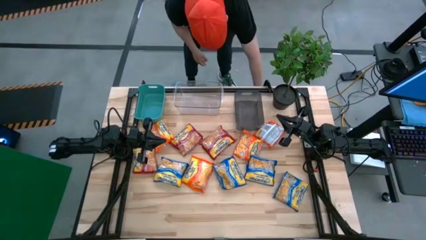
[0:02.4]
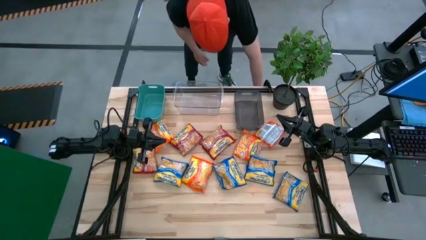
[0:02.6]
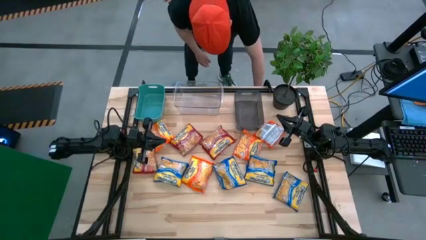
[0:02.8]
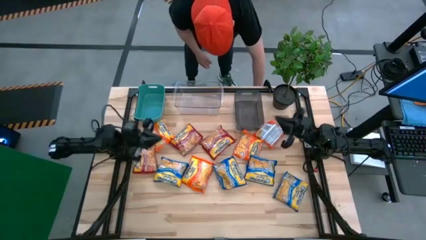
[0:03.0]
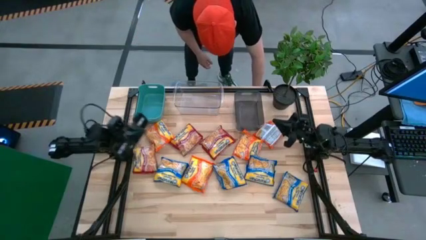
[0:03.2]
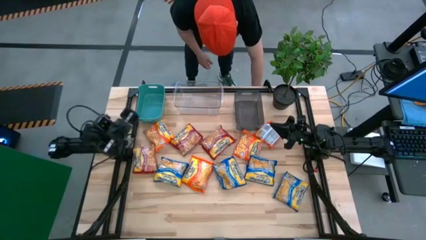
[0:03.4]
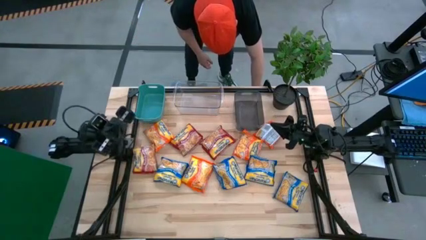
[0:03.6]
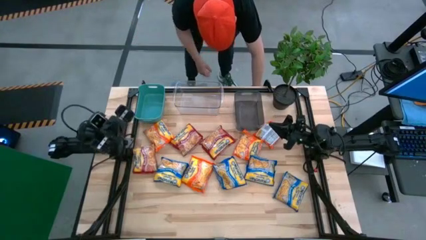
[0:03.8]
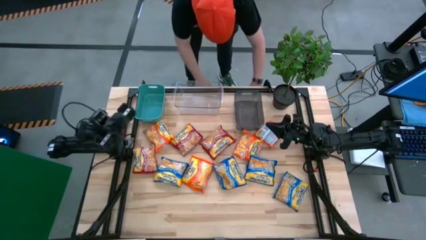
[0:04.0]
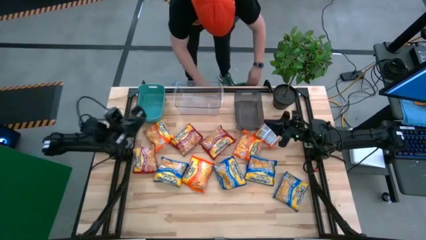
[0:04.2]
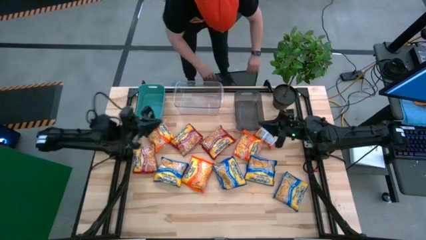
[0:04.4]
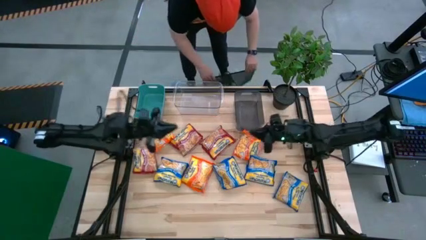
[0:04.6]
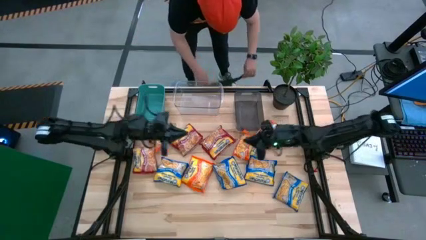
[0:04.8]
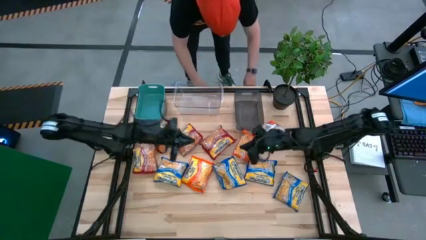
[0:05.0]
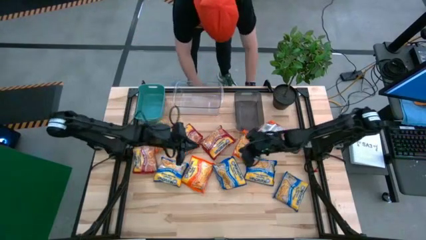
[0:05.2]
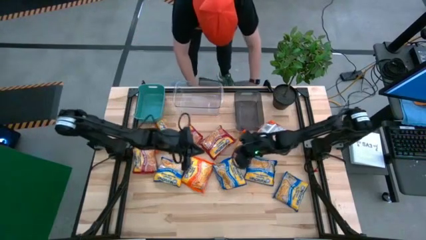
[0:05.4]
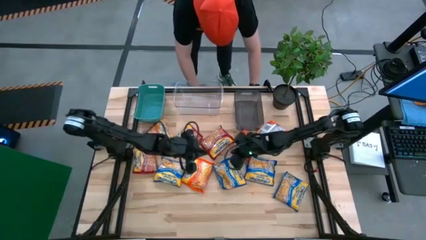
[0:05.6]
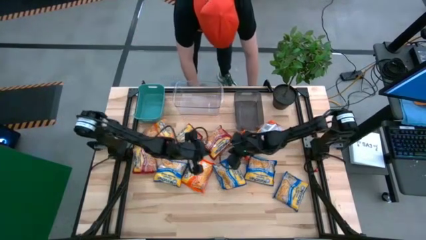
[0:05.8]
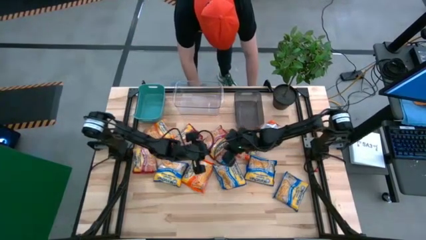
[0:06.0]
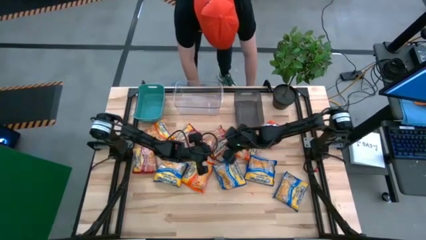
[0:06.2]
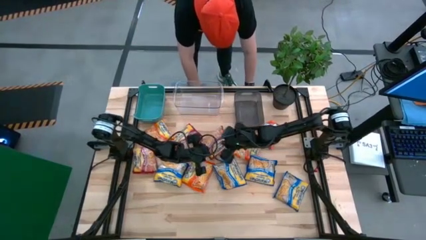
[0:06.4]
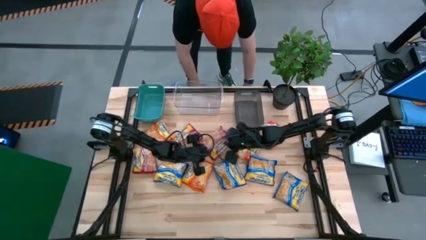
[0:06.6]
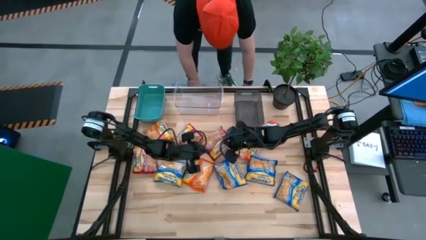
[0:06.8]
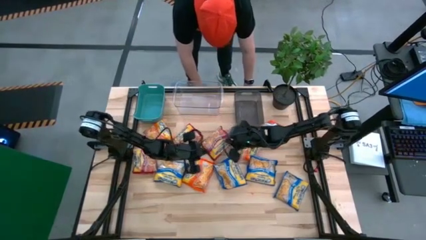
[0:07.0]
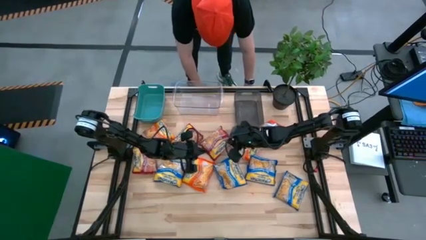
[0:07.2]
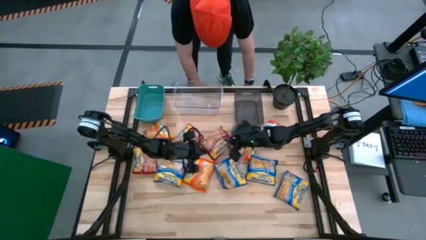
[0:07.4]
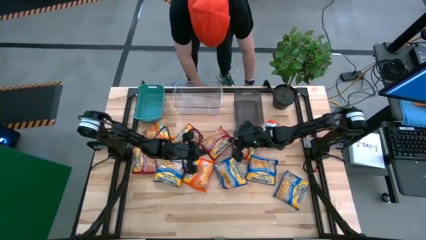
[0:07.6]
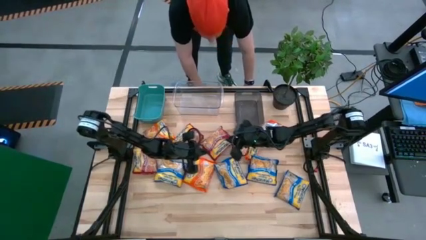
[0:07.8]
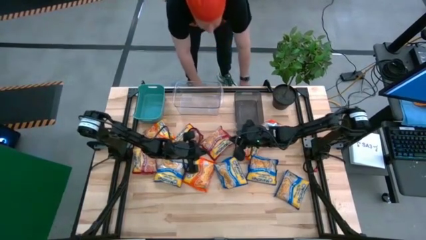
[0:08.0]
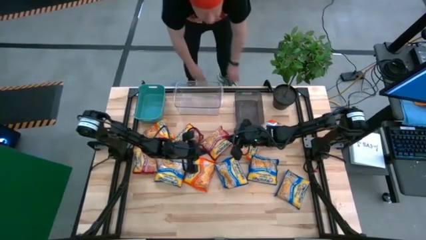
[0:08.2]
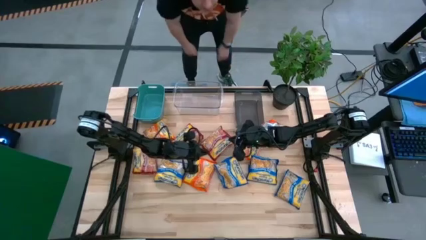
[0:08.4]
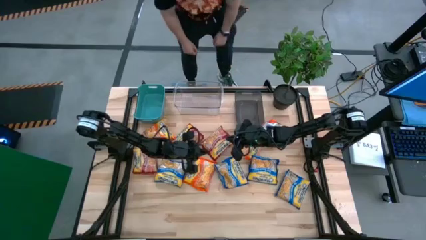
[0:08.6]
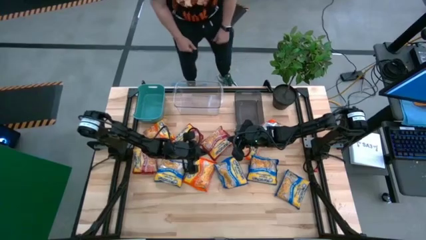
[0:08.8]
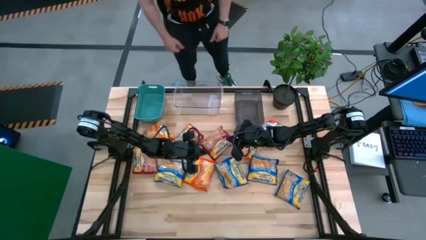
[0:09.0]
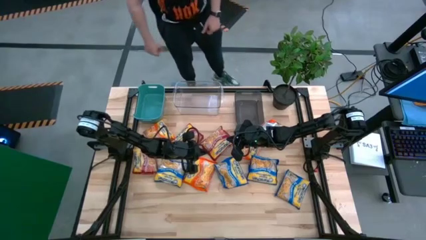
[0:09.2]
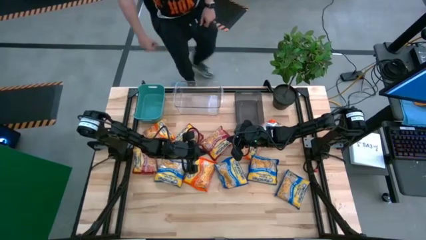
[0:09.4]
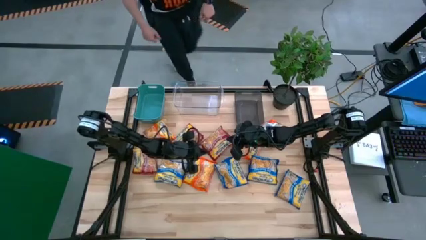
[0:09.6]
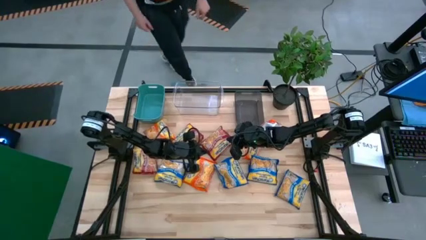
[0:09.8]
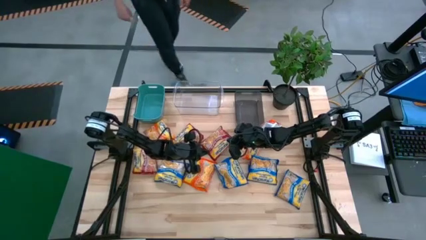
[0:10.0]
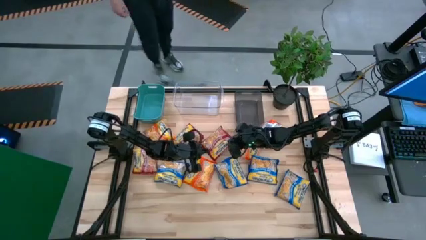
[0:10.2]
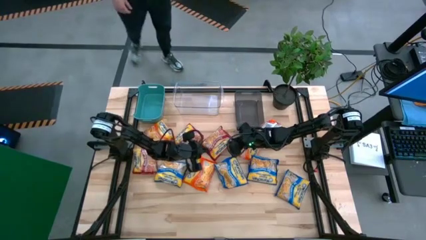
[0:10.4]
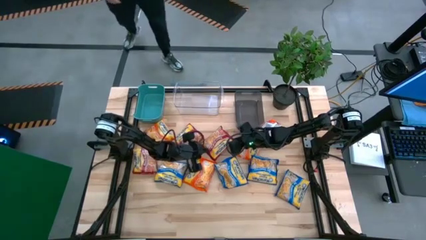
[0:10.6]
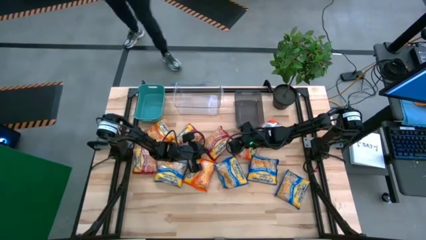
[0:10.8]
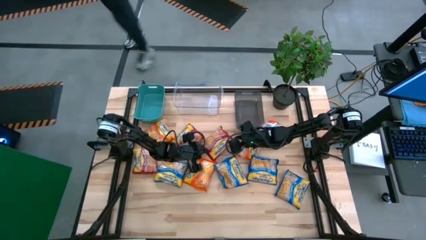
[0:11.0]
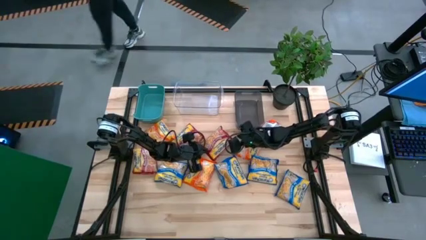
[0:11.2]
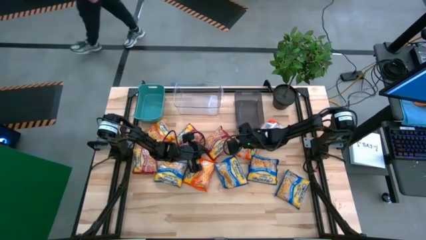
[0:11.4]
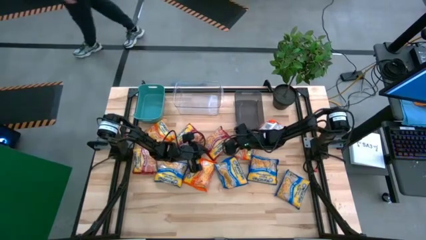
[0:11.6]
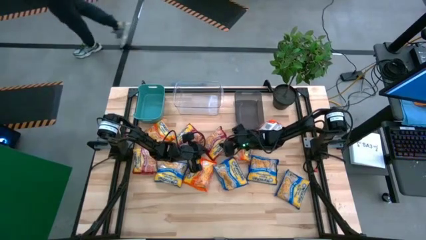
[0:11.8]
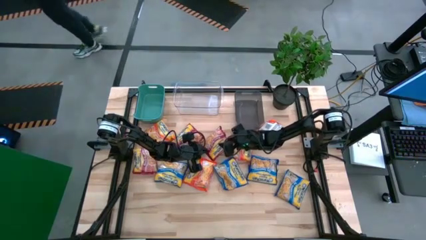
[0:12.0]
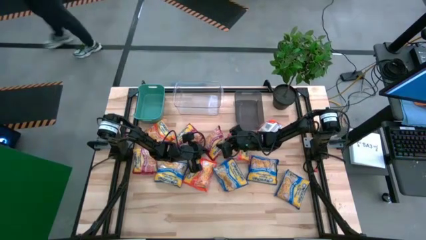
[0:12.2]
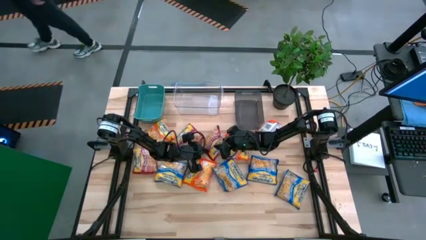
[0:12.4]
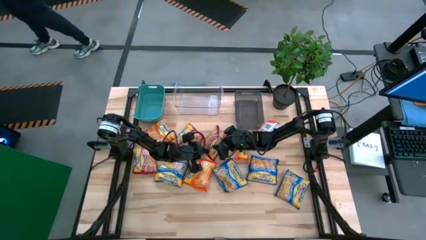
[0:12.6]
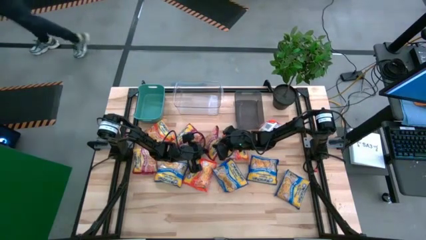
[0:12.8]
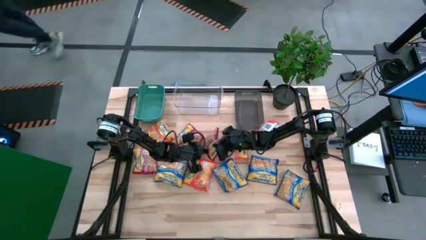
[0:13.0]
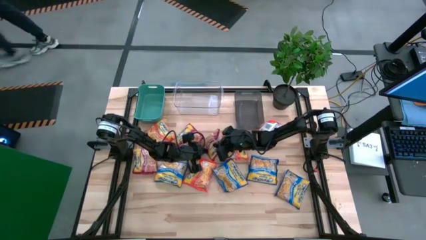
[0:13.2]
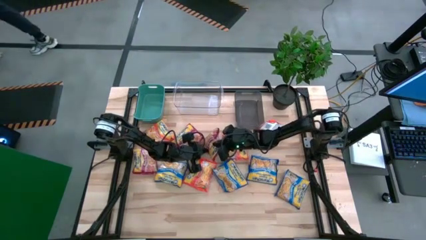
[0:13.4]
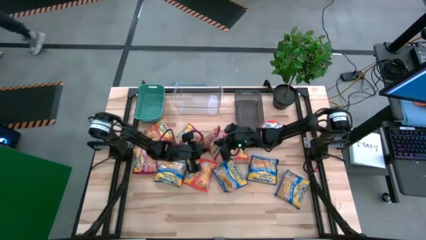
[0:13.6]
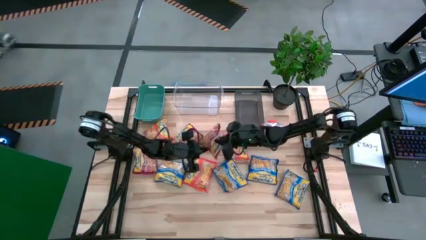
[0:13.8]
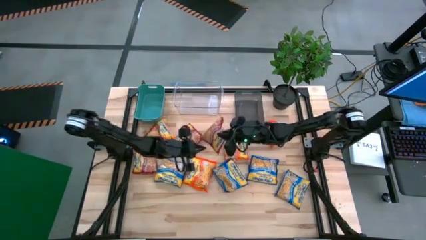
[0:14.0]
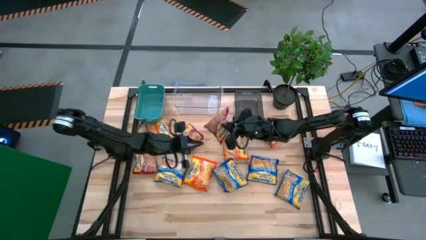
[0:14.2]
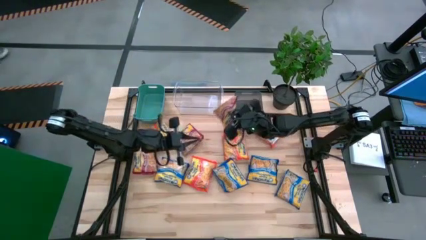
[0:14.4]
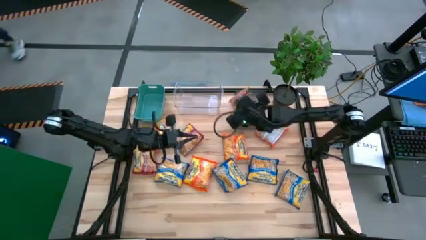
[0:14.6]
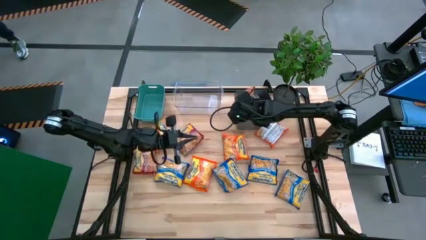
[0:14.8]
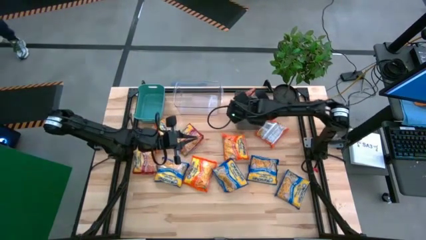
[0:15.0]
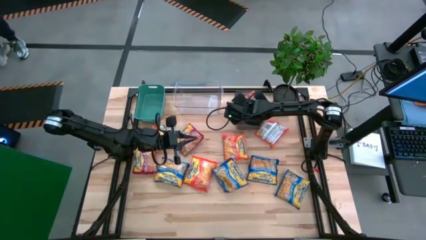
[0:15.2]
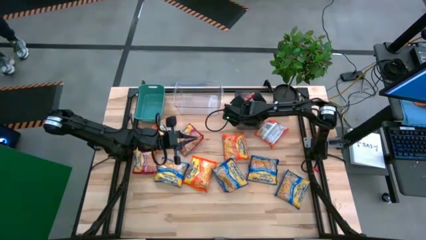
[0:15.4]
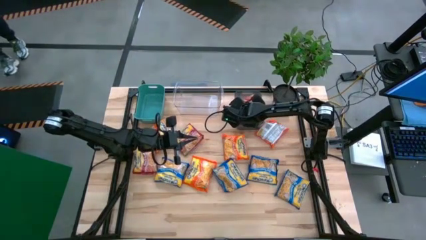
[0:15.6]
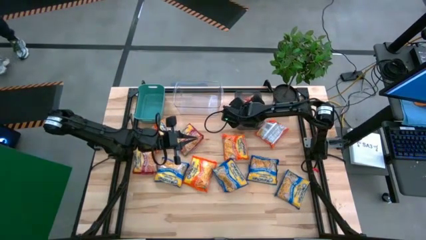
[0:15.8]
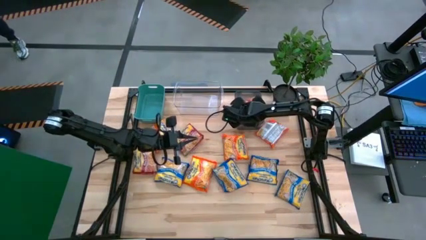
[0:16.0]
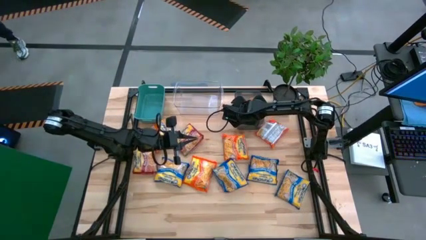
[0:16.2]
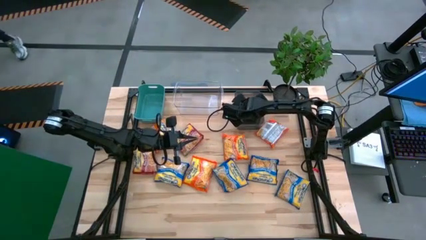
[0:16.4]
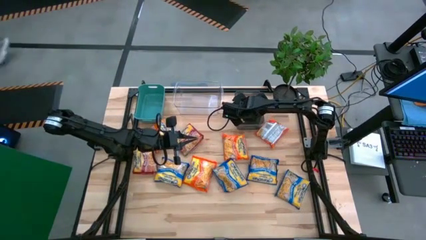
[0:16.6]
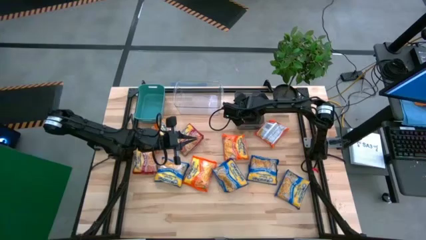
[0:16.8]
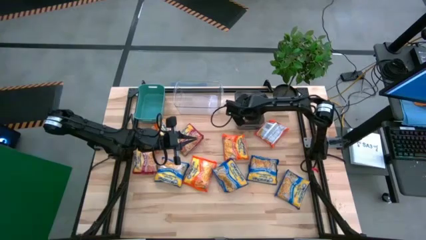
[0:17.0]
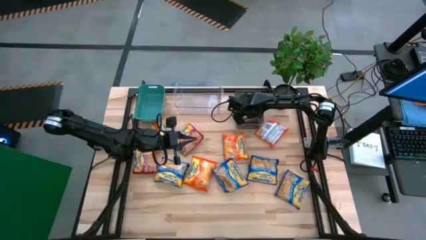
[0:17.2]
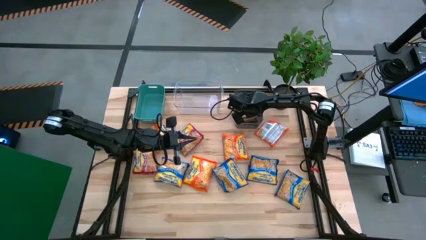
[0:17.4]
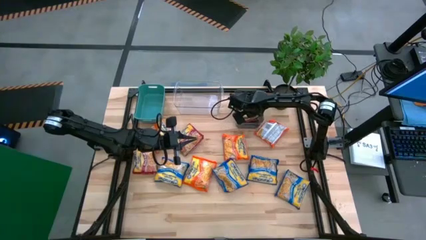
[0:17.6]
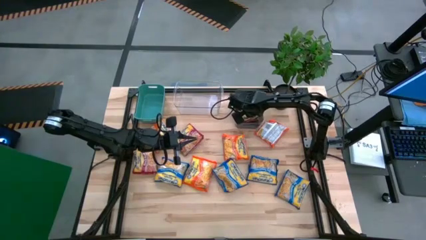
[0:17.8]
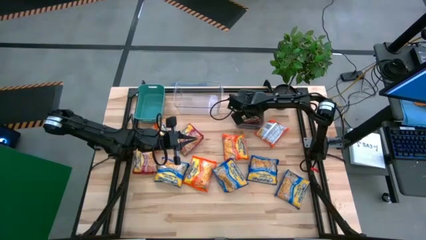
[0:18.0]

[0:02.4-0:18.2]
Task: Sort Maruchan noodles
Put the red noodle pack into the black bin
